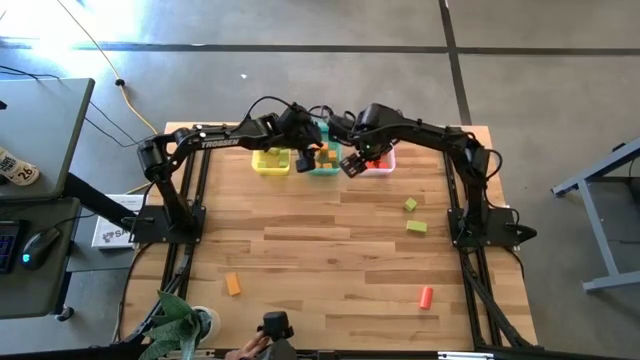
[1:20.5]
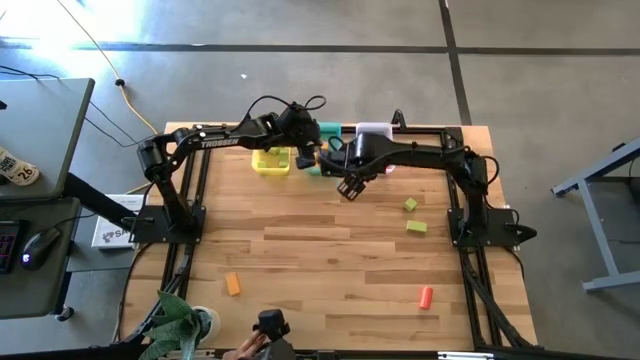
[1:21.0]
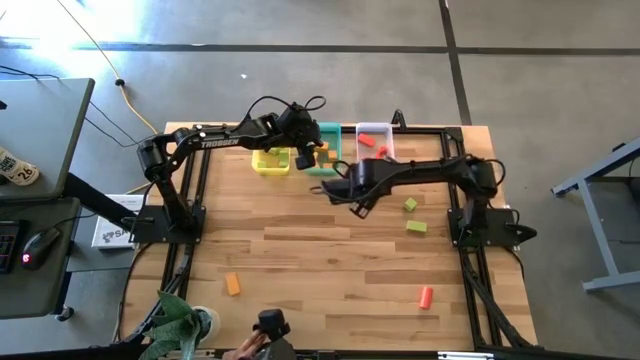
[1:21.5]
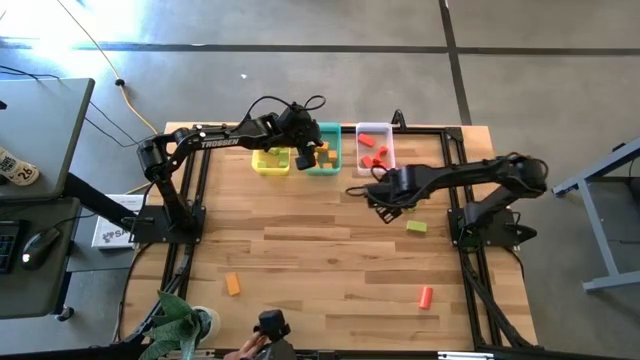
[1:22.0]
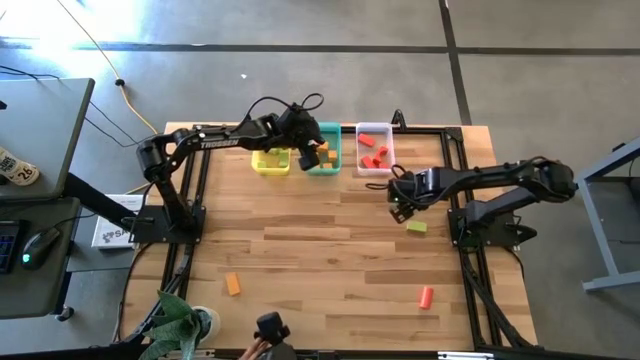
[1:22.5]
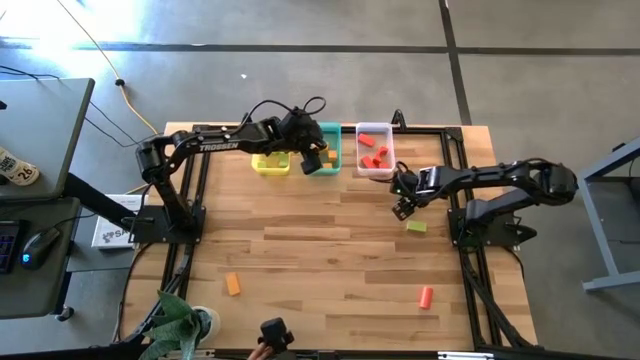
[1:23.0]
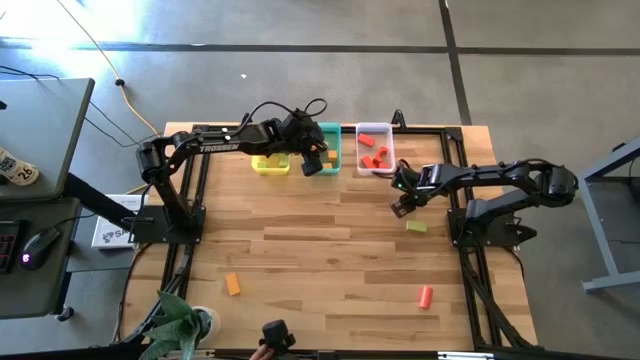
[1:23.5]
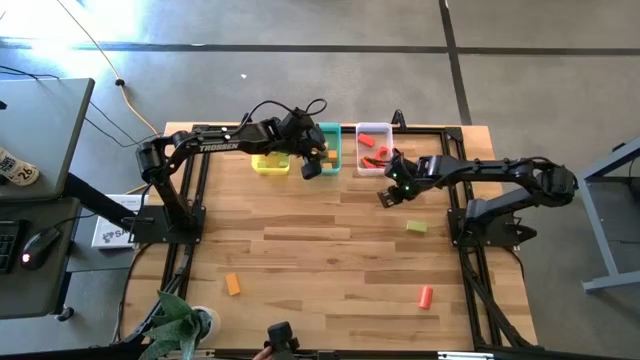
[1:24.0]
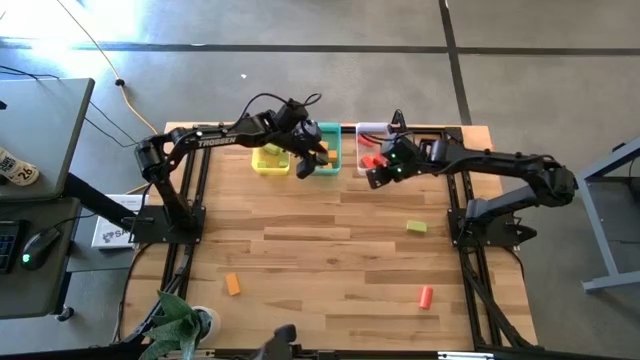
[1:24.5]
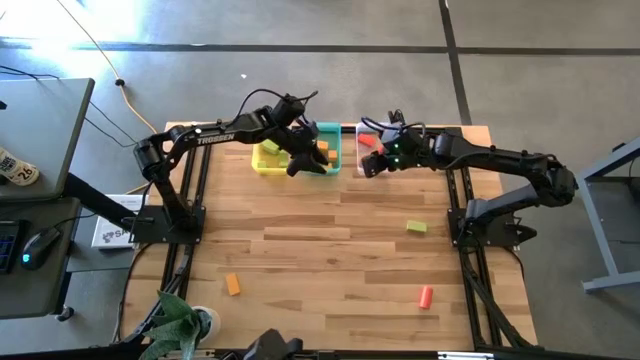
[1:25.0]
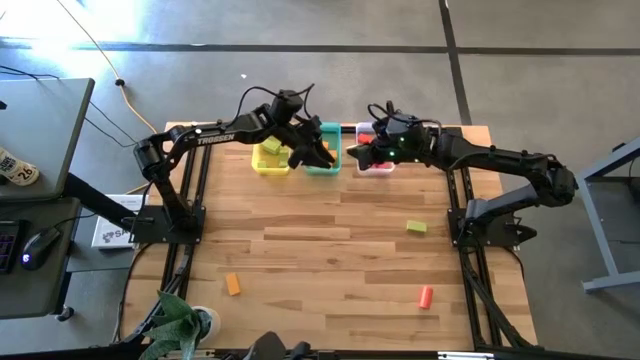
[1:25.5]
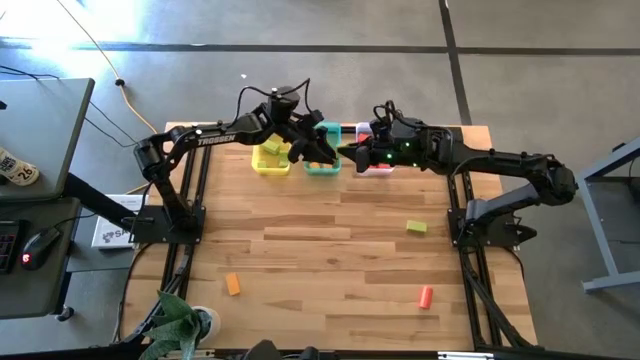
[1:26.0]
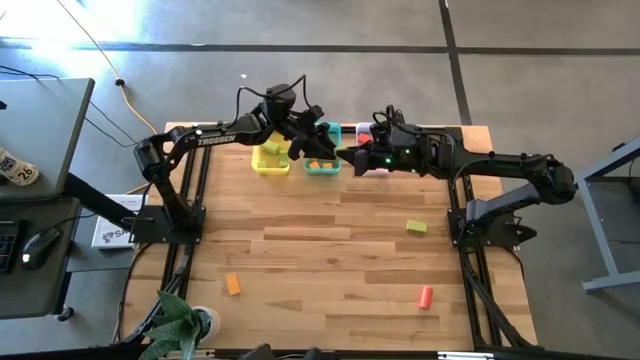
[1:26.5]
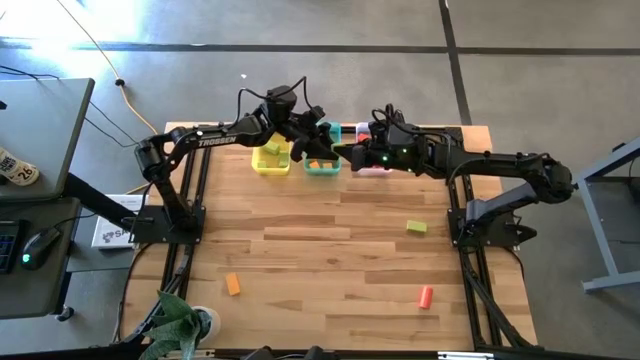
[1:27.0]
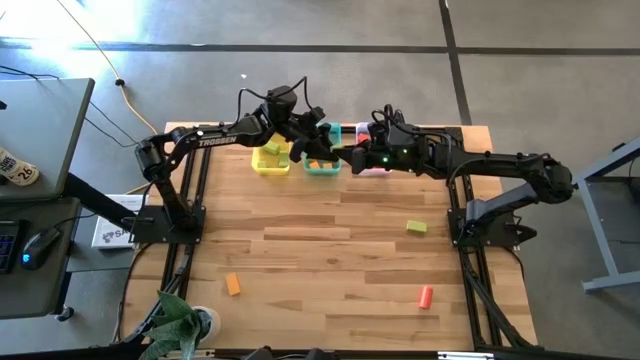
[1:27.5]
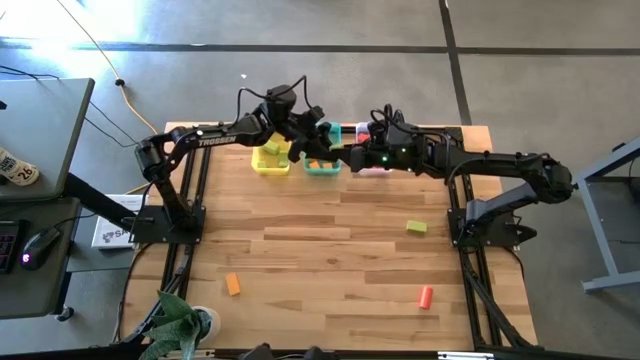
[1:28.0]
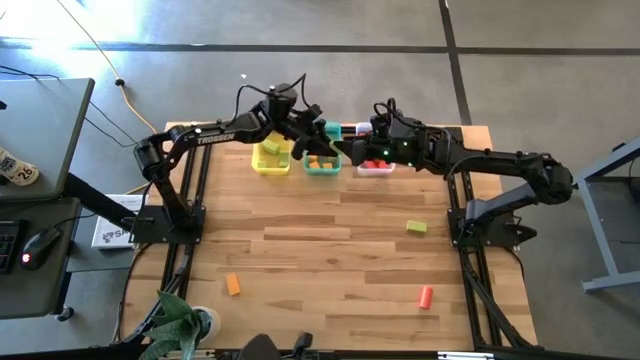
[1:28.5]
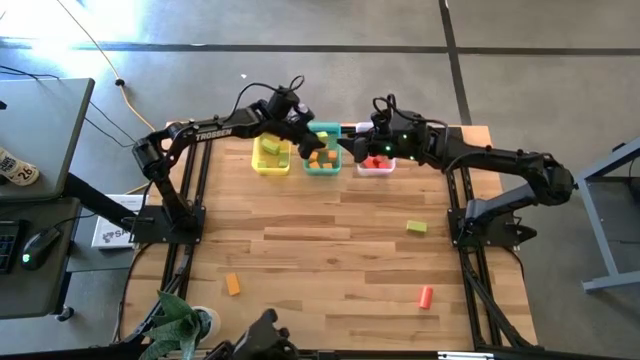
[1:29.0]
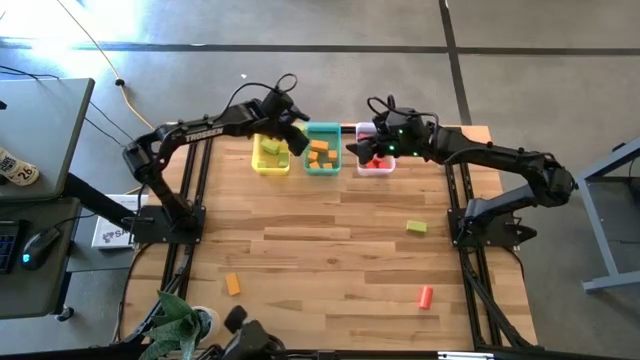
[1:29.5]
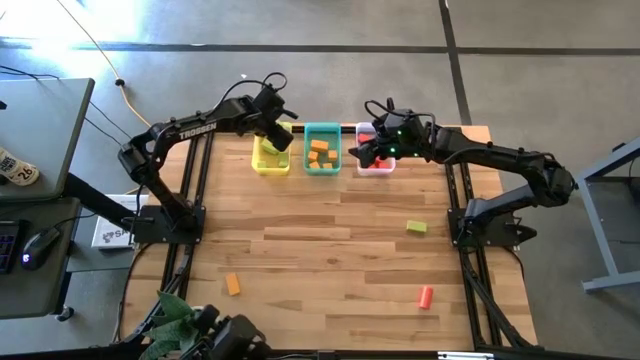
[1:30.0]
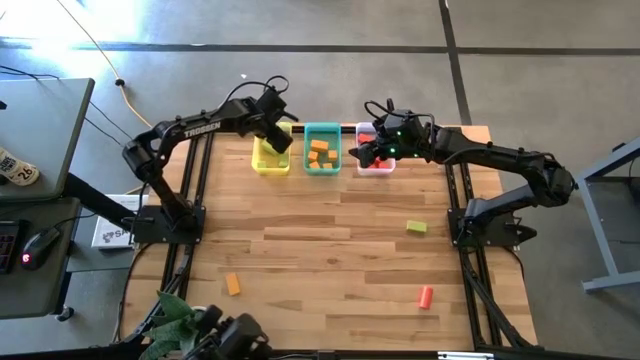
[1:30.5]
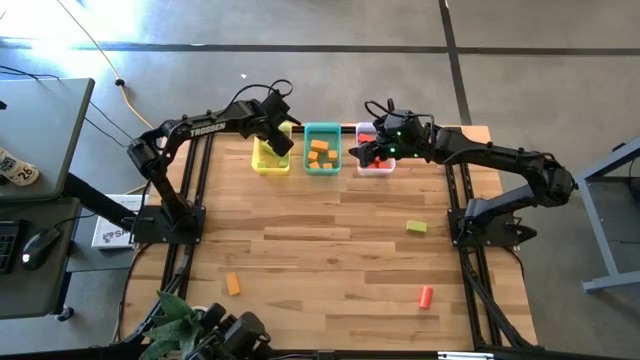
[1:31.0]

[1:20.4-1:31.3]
Task: Sort & place blocks by color
Put the green block into the yellow bin

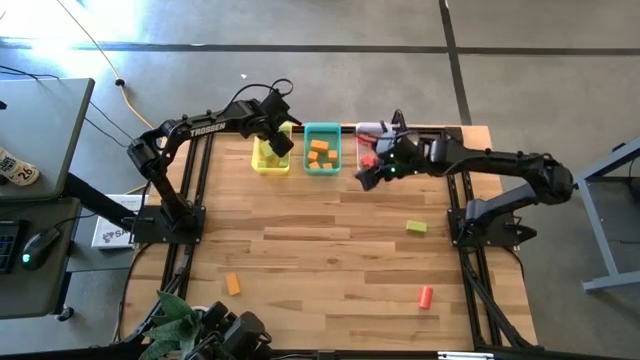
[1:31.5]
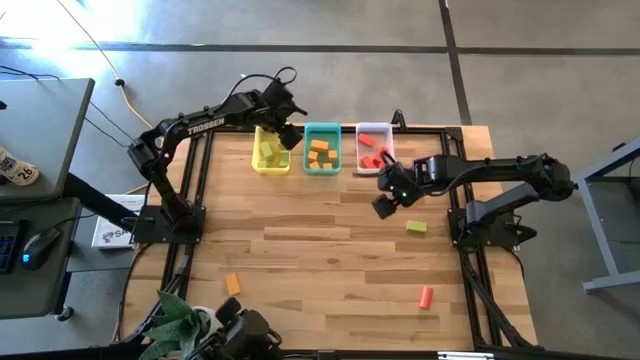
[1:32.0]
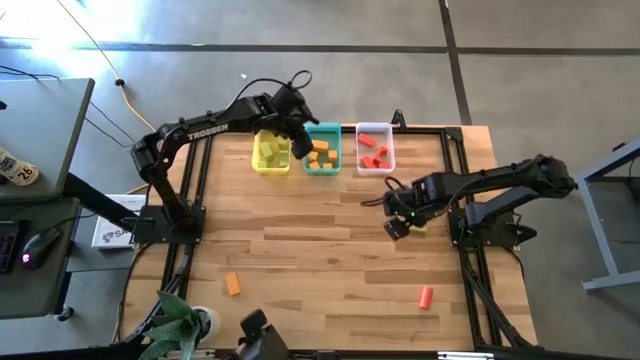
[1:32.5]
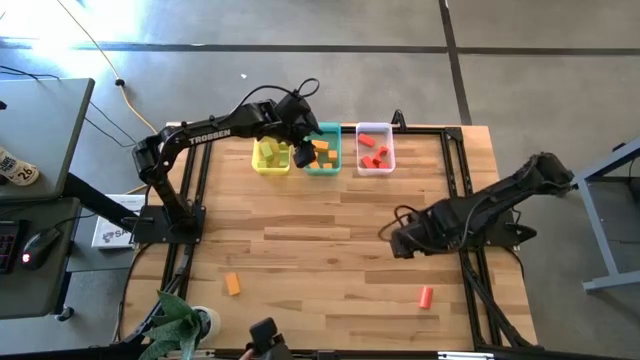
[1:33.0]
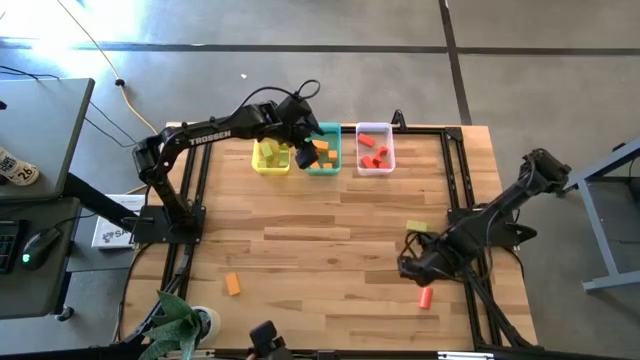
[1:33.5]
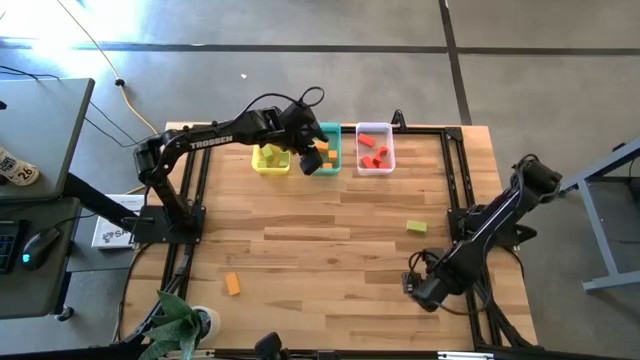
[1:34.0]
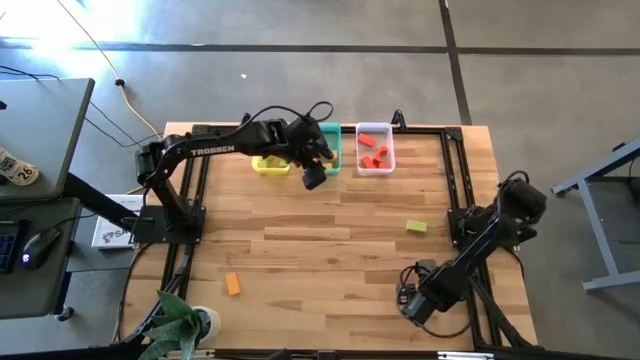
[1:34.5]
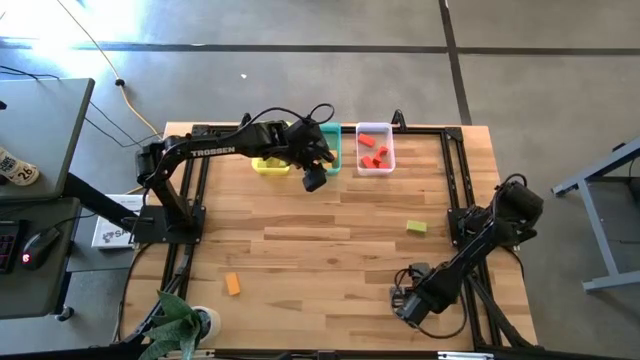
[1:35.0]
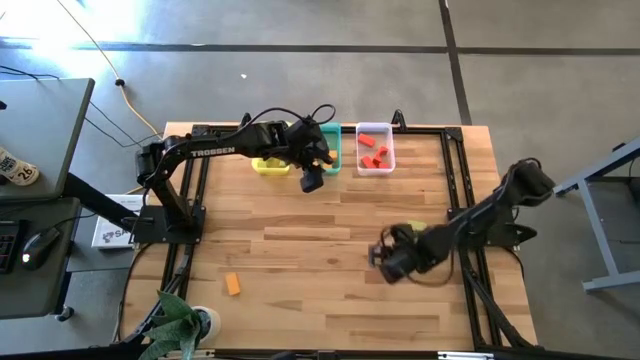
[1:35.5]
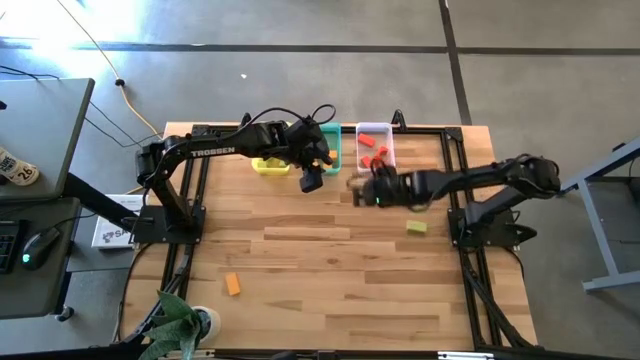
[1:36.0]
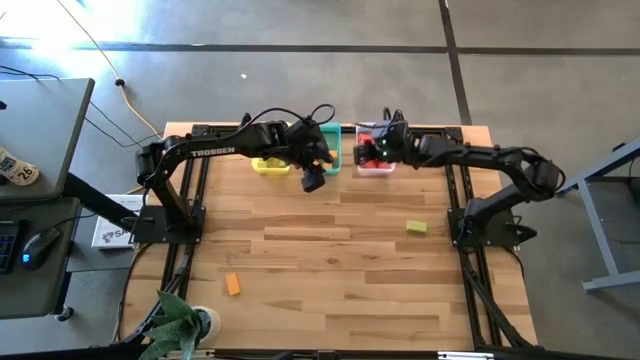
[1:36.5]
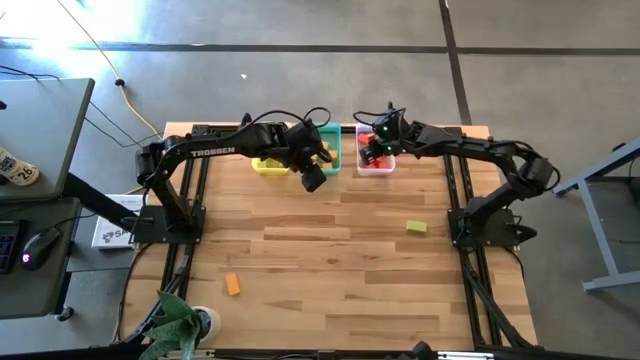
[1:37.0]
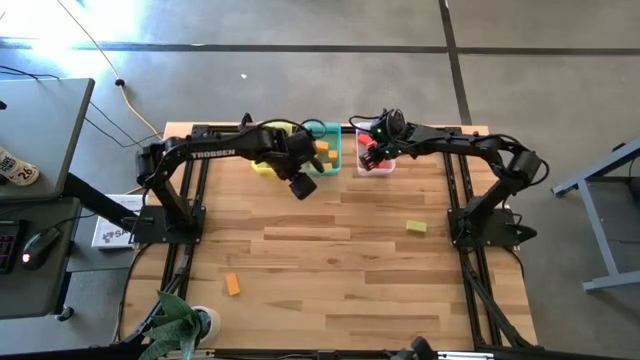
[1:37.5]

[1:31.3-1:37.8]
Put the orange block into the white bin

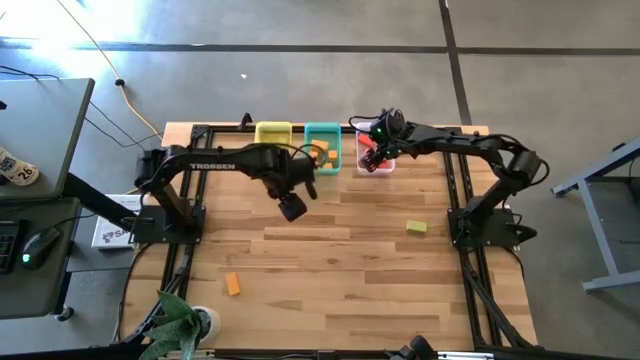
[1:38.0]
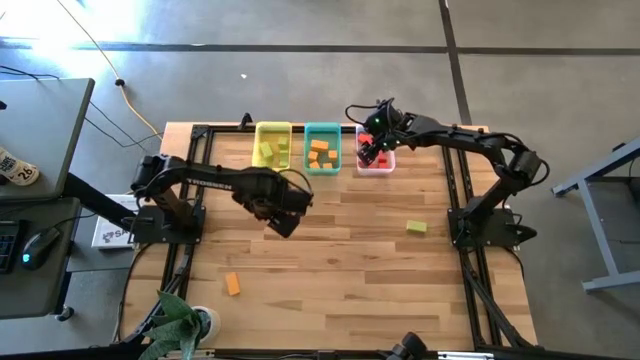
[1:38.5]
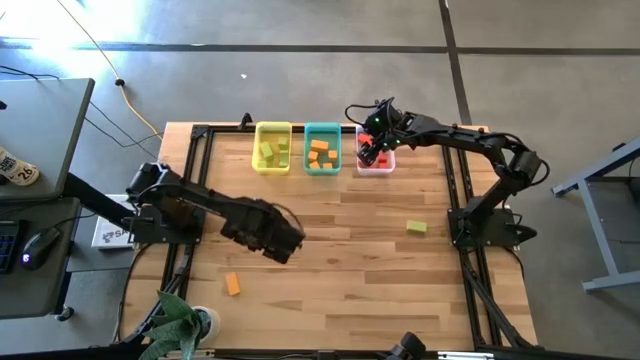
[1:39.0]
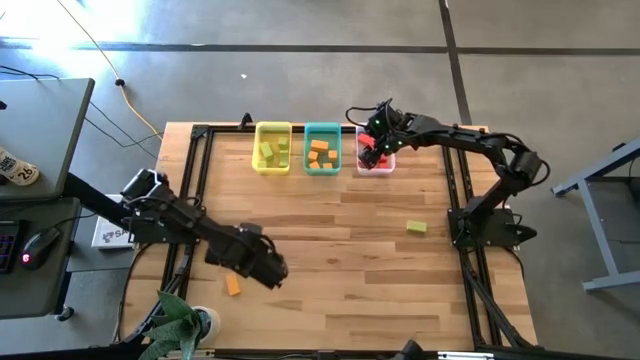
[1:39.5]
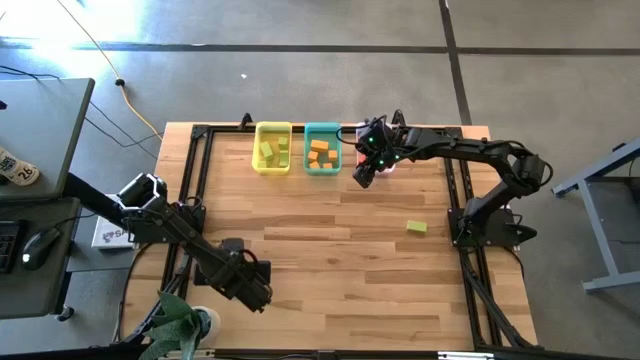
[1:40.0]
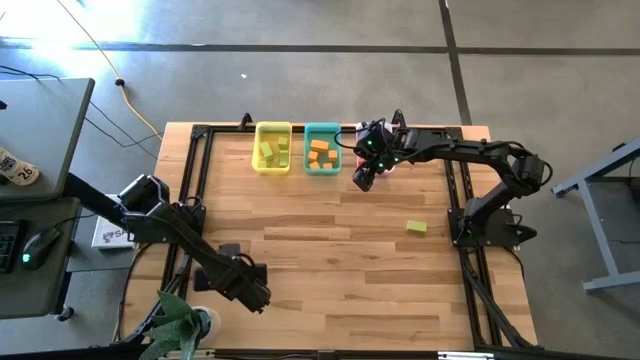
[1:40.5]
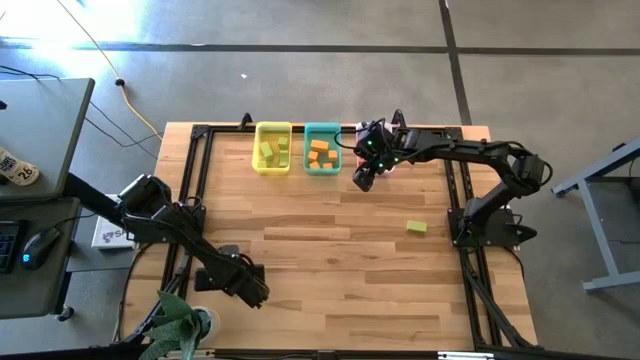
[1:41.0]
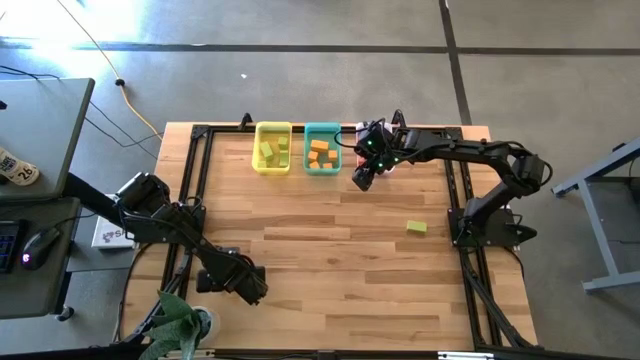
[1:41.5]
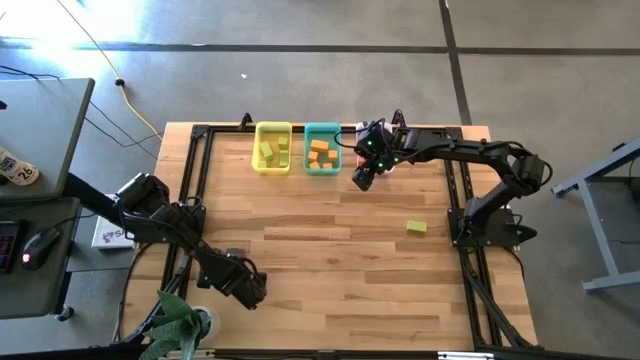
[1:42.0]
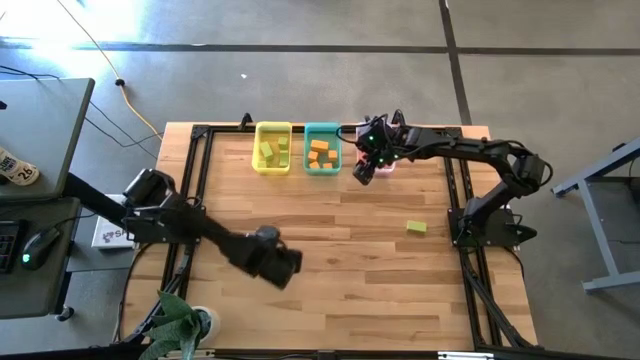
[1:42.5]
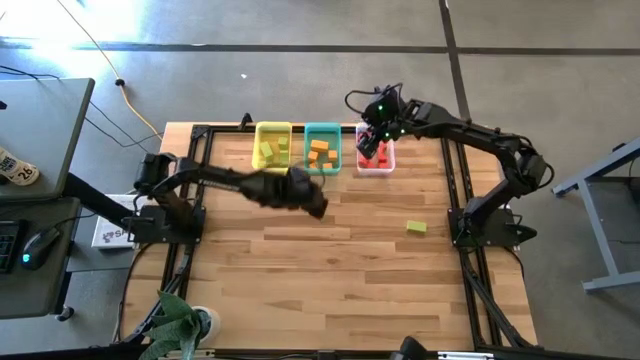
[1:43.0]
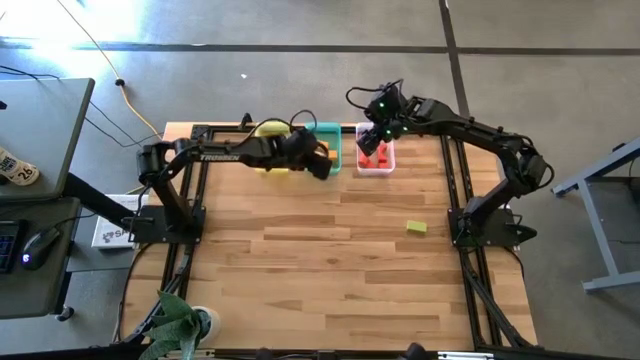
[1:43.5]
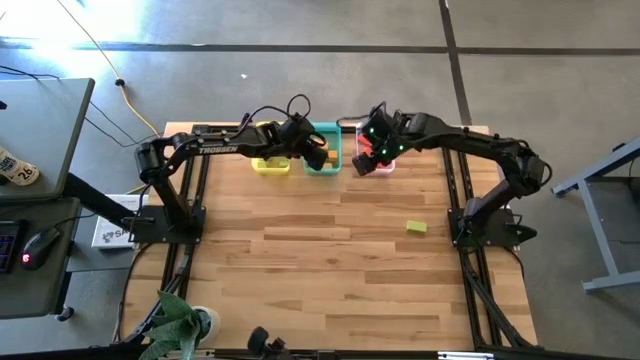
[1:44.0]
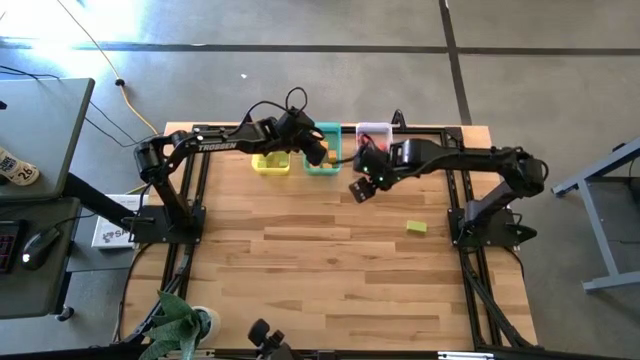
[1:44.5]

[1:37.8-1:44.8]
Put the yellow block into the blue bin
